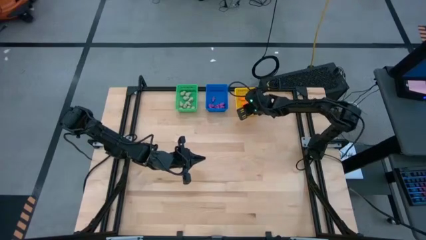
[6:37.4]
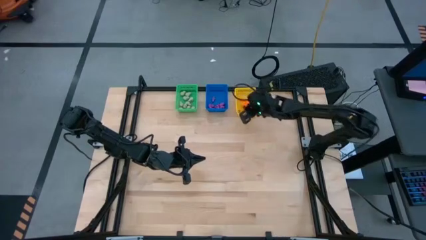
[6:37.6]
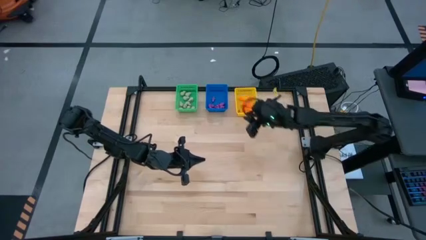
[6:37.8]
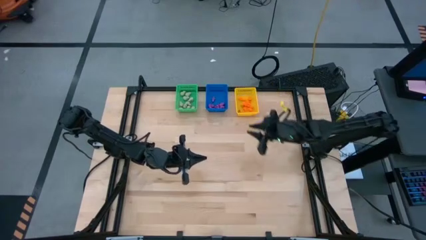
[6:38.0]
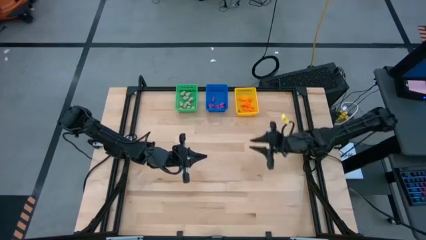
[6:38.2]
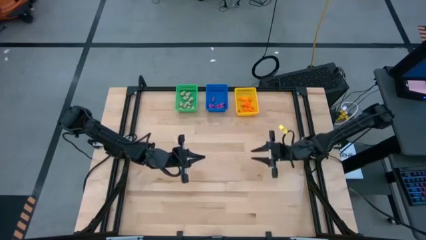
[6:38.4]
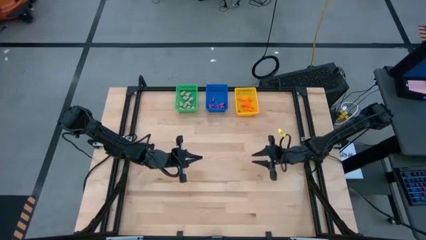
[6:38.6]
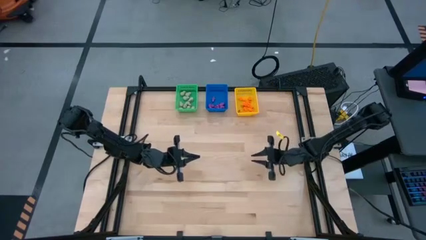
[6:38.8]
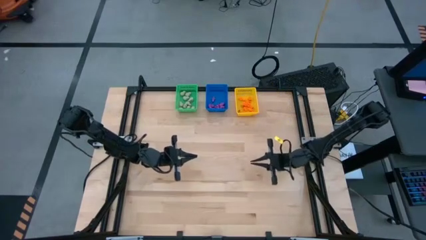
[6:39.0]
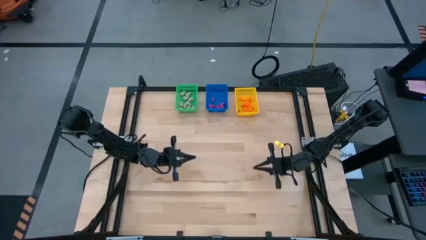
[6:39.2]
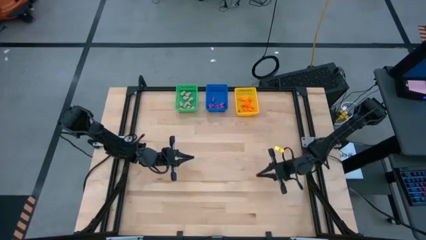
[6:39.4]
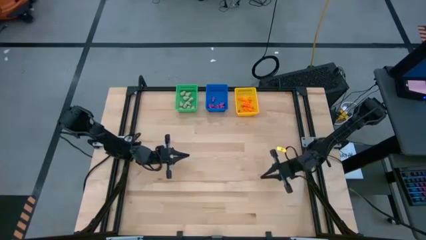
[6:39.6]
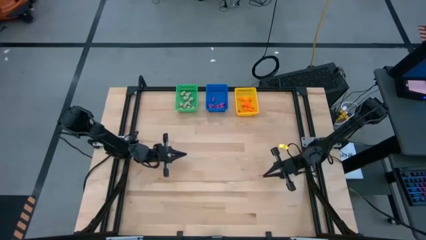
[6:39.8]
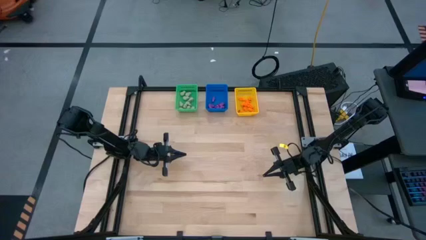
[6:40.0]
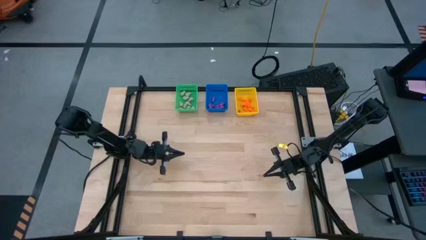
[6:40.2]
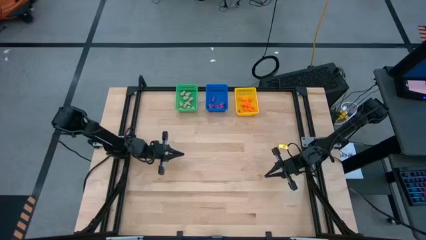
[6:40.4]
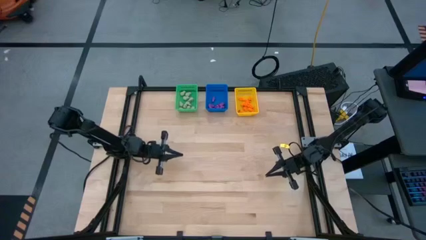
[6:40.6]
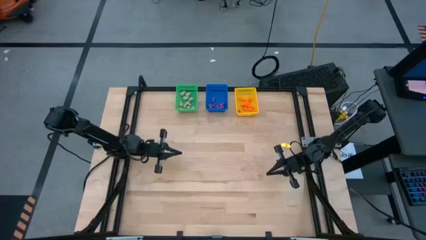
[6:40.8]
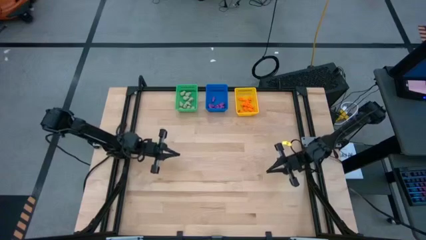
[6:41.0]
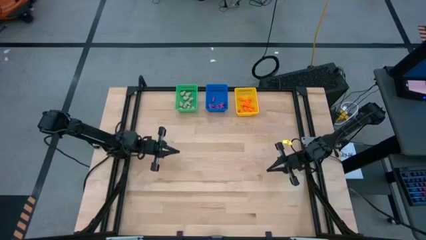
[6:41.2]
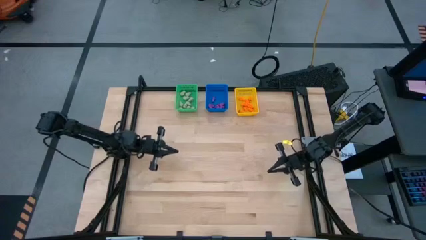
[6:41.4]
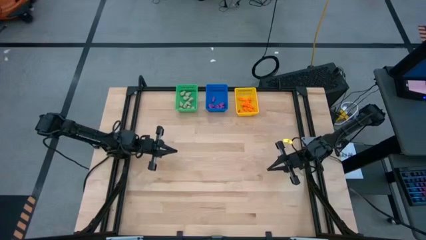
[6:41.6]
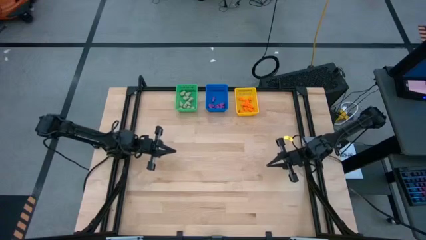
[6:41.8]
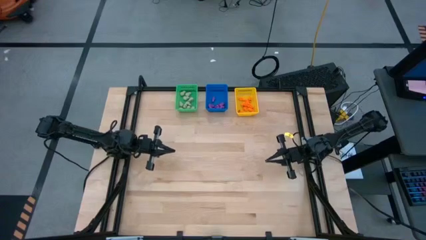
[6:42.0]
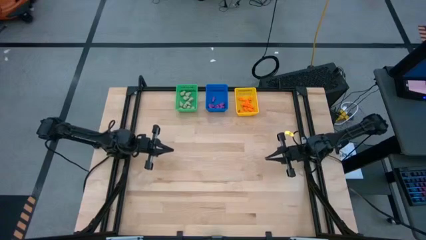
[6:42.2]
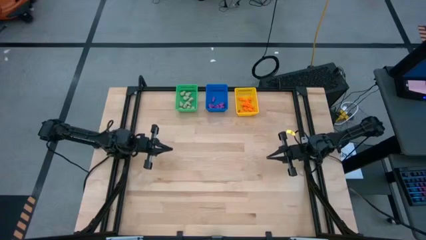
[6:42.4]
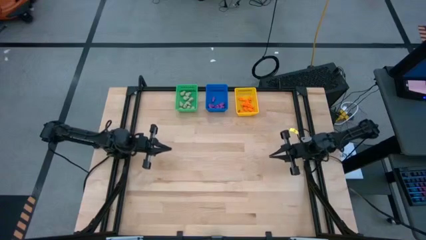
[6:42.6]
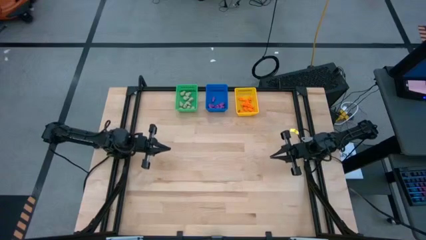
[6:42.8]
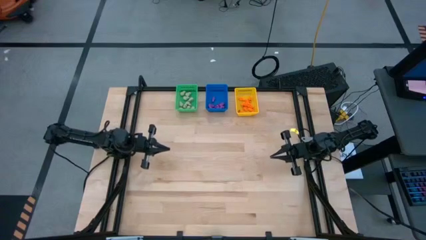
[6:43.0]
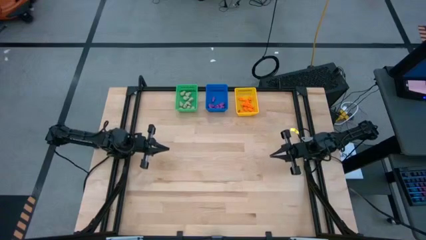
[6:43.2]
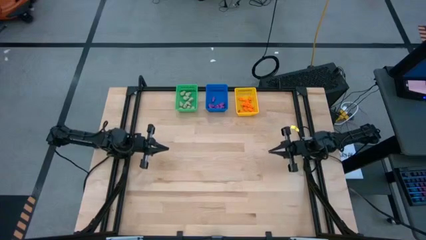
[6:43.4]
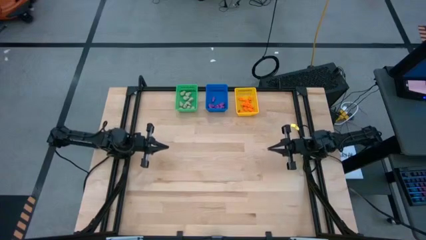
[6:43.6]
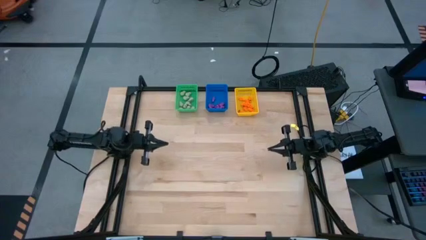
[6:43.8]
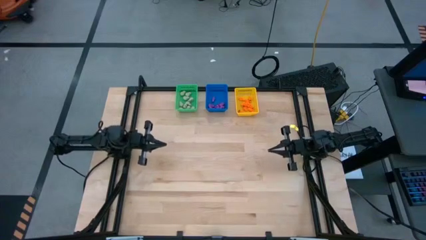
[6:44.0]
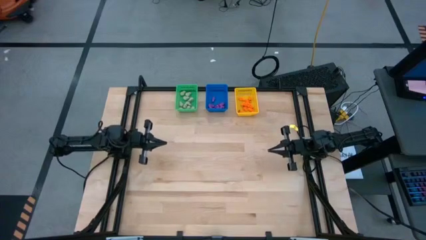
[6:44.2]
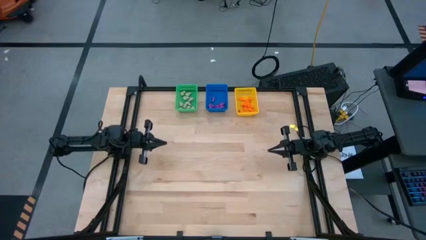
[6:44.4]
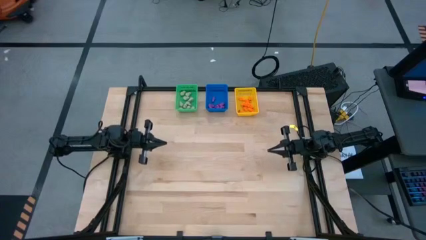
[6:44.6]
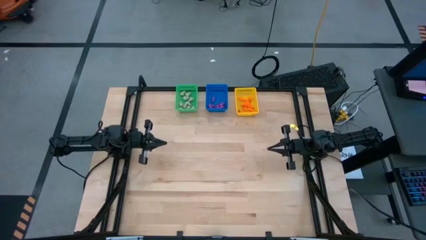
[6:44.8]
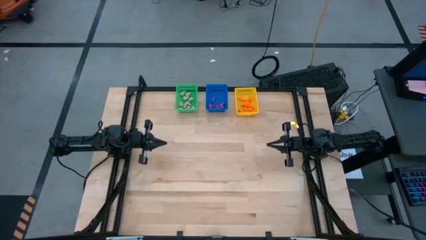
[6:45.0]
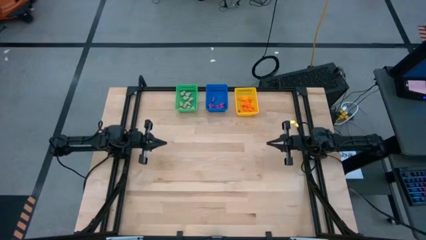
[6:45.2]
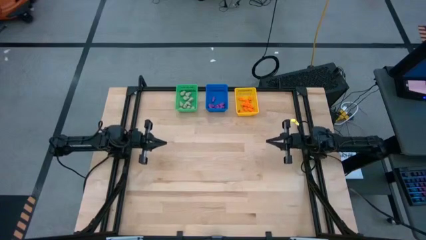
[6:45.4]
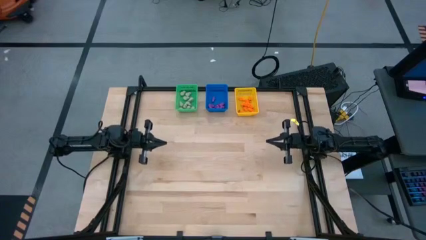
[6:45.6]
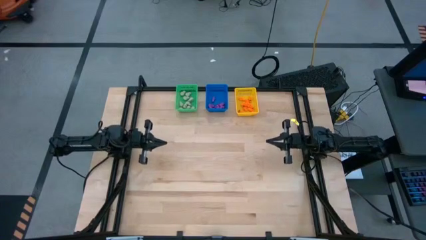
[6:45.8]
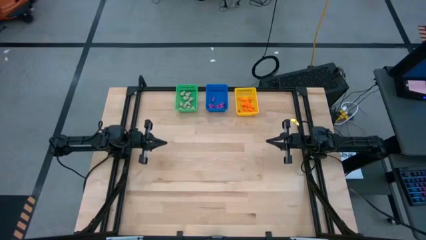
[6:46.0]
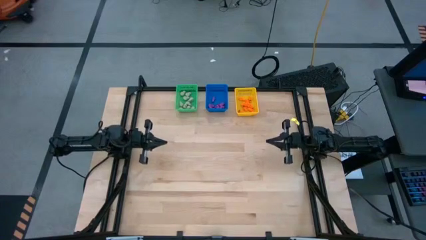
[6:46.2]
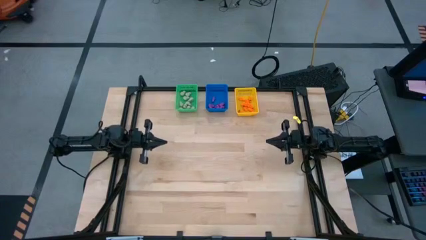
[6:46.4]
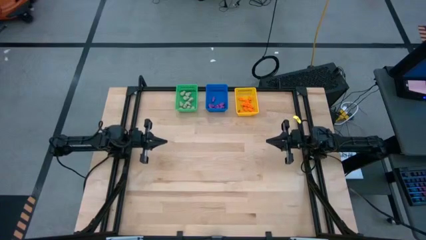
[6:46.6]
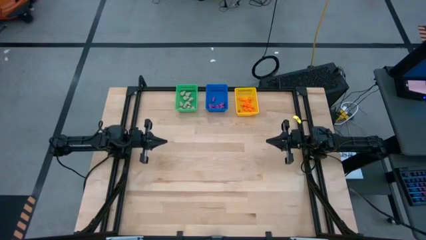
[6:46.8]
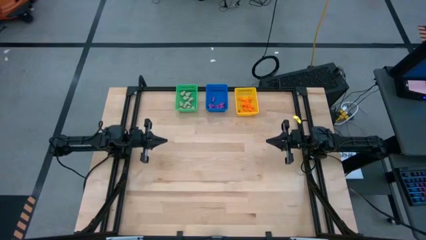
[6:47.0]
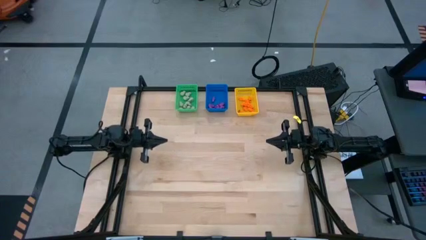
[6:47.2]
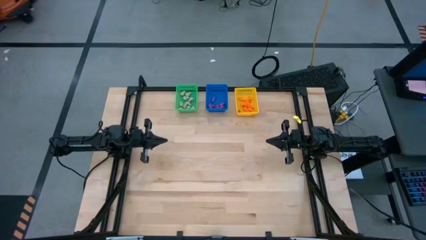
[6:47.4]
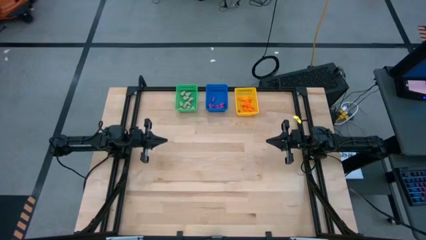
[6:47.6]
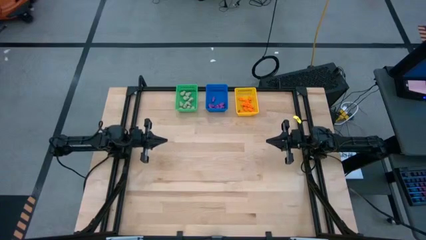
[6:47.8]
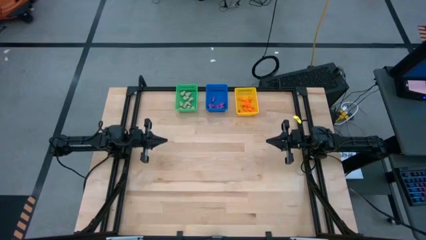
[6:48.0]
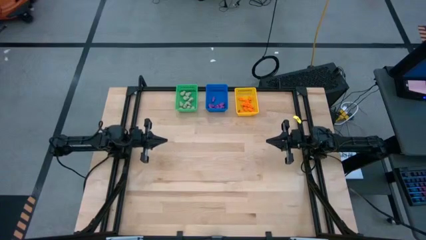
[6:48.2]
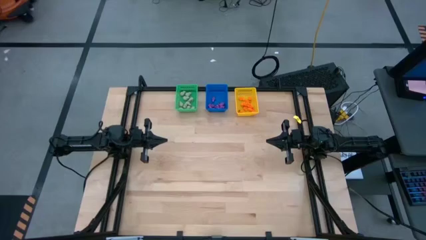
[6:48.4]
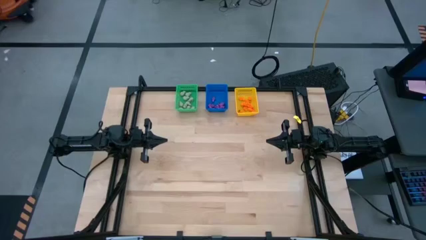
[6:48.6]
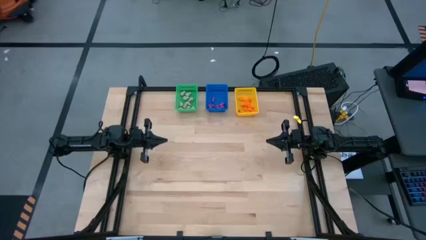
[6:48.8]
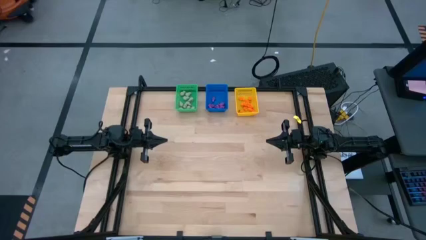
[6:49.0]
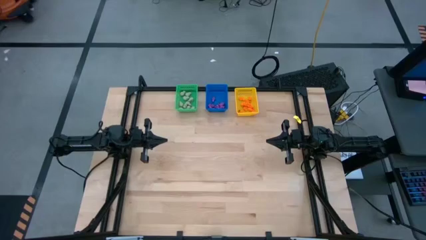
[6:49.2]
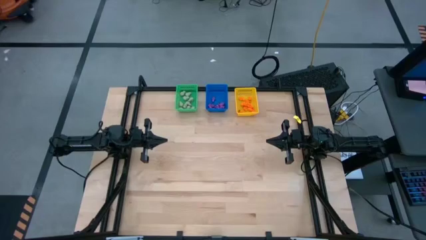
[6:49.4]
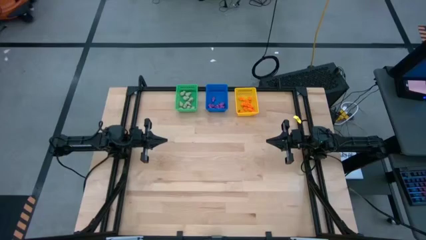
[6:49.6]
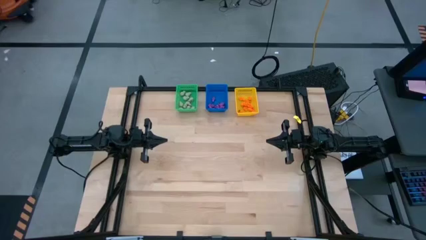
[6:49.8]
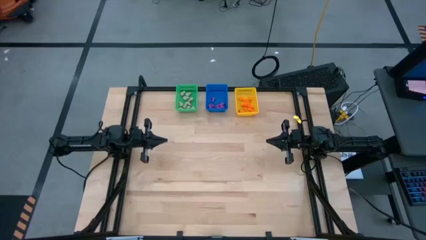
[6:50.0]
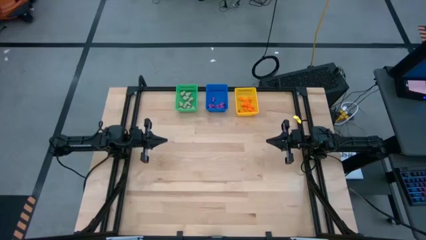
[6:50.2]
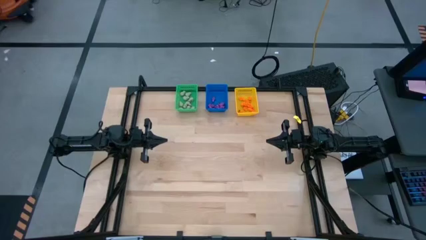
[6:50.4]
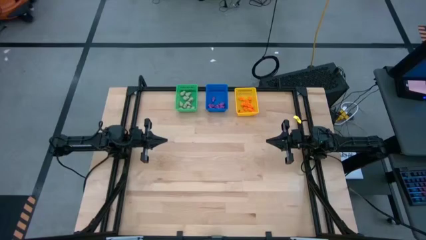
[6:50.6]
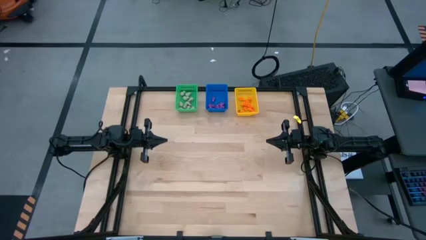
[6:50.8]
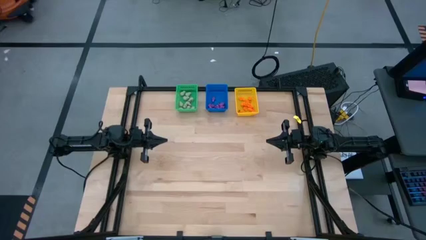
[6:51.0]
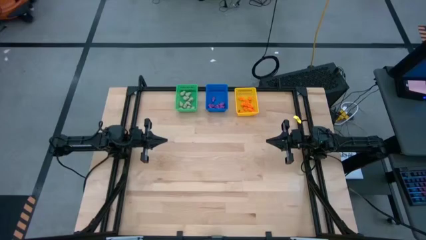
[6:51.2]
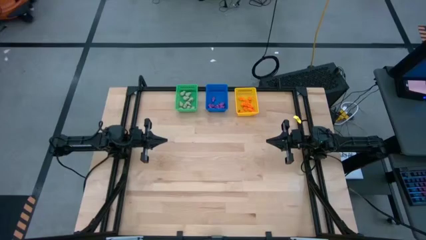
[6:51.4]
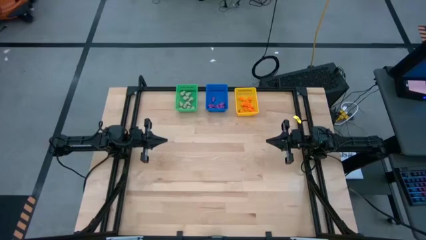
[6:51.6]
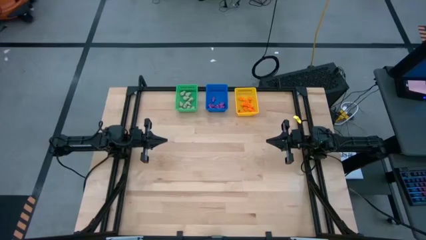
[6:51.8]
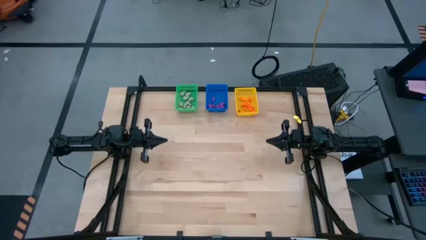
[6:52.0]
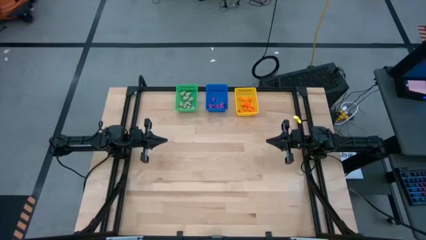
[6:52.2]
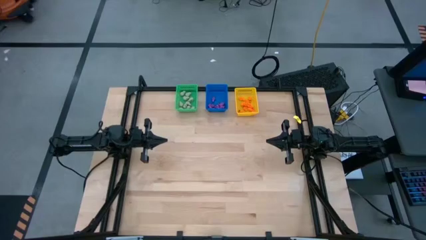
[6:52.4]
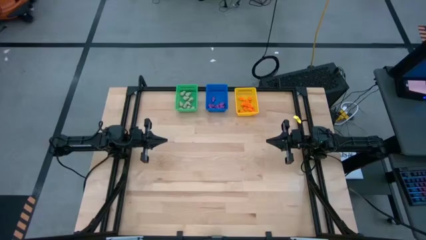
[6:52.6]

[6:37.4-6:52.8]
Task: Sort Halloween decoration
Return to Home Position

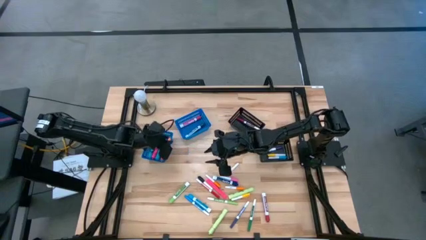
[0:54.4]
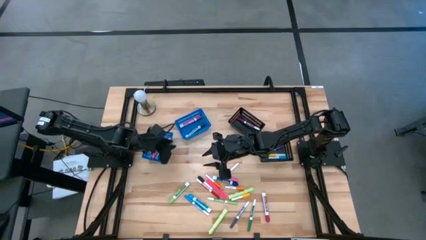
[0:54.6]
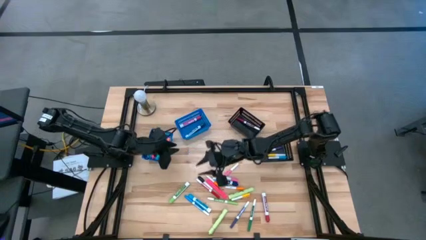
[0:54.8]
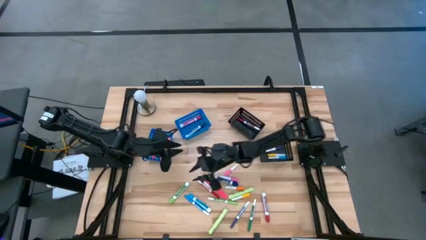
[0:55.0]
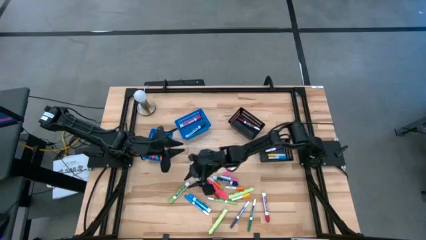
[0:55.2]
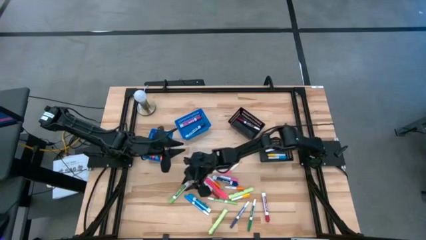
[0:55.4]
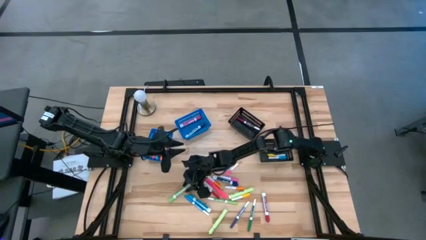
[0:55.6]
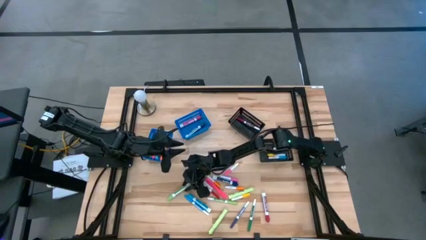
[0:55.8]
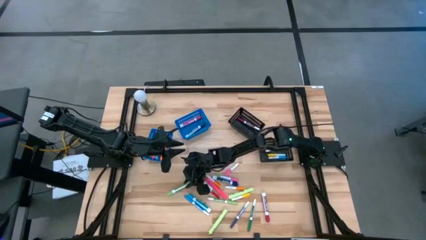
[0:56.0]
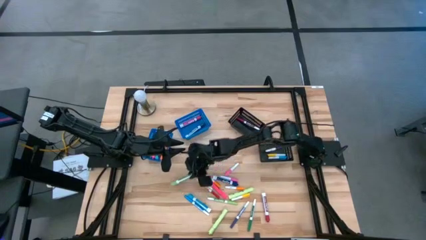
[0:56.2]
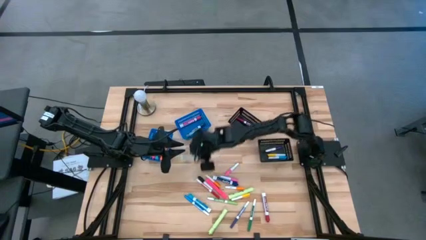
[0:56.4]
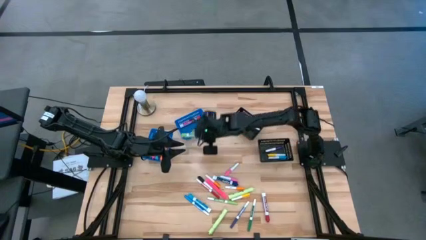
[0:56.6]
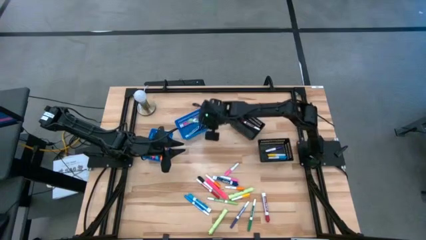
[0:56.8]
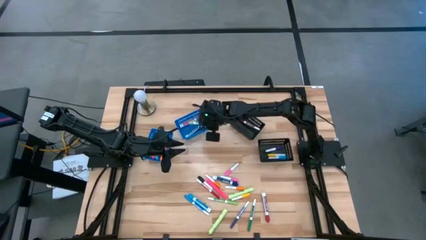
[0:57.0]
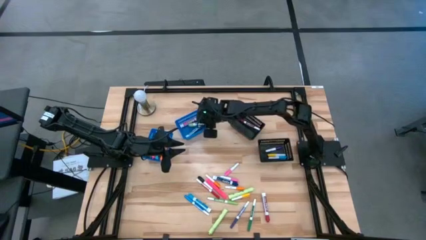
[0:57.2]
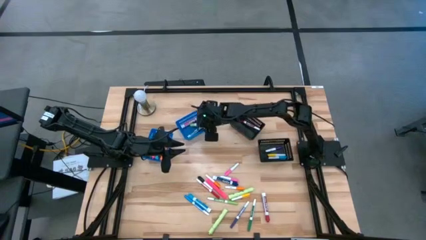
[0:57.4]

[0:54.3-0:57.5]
Task: Pick & Place Markers
Put the light green marker pen into the right blue bin
